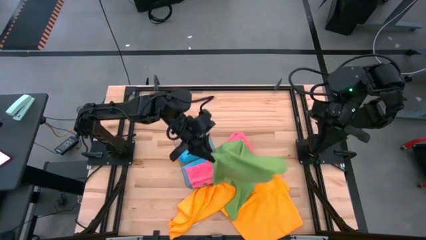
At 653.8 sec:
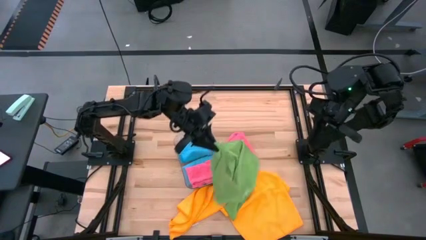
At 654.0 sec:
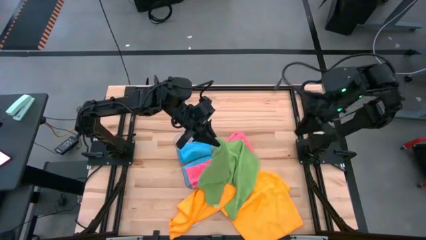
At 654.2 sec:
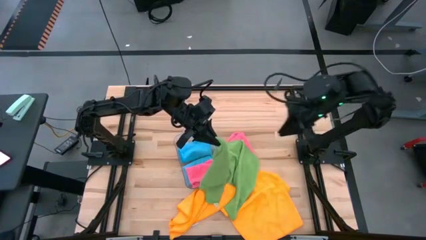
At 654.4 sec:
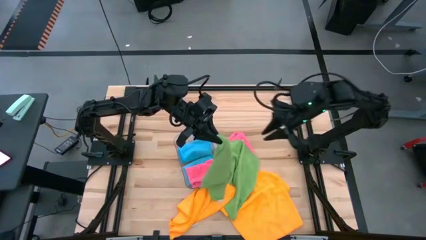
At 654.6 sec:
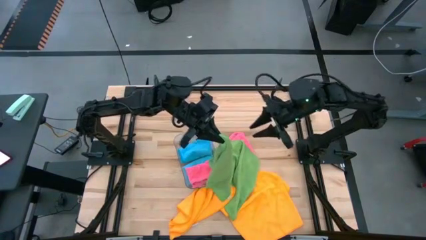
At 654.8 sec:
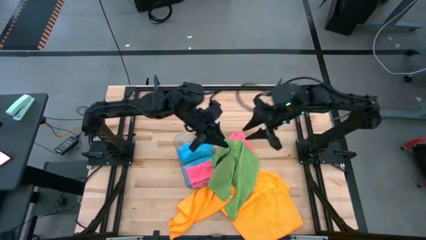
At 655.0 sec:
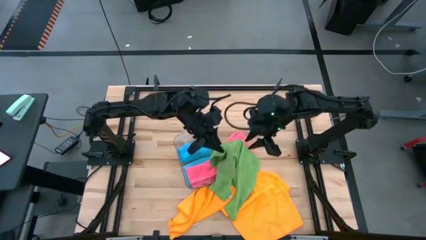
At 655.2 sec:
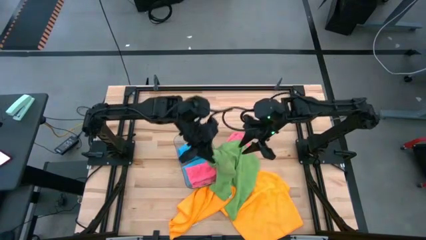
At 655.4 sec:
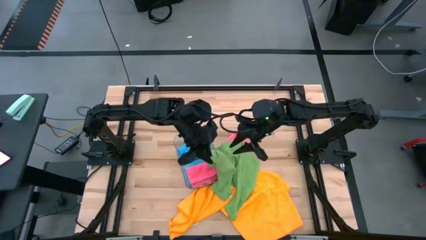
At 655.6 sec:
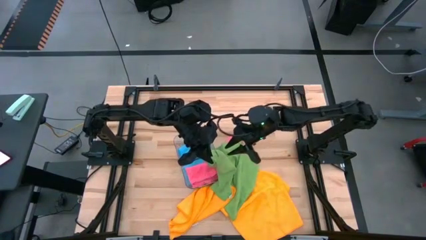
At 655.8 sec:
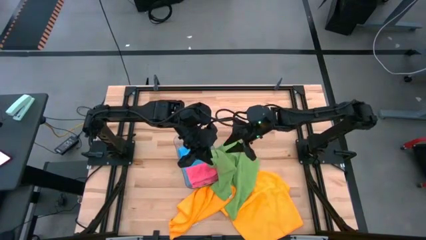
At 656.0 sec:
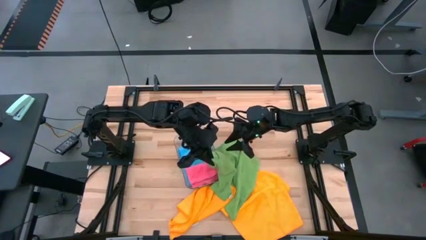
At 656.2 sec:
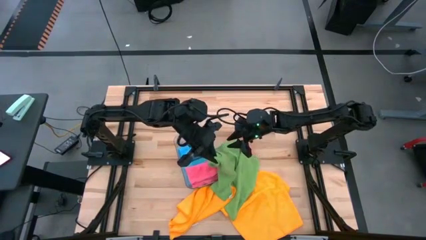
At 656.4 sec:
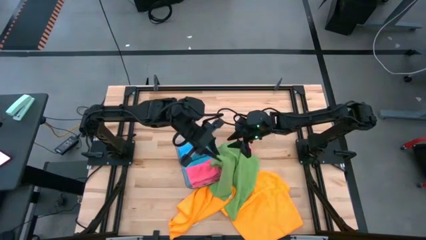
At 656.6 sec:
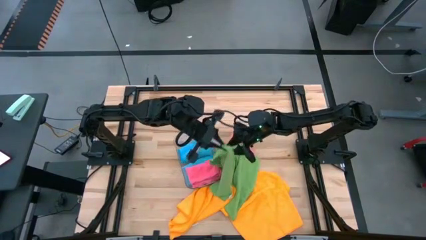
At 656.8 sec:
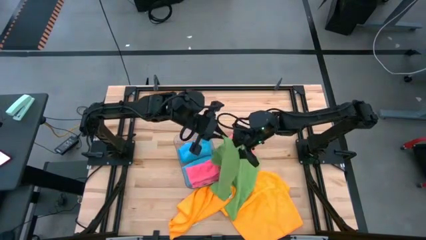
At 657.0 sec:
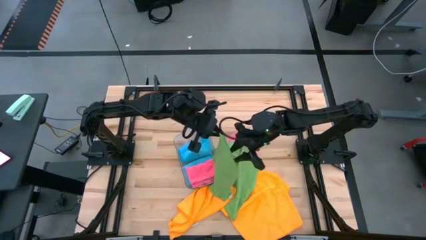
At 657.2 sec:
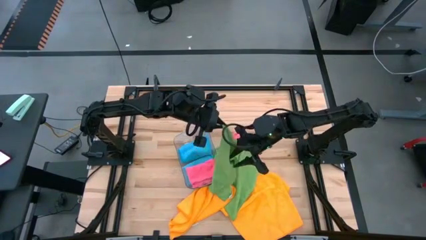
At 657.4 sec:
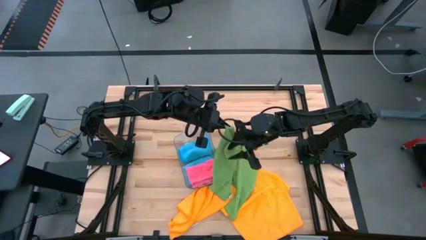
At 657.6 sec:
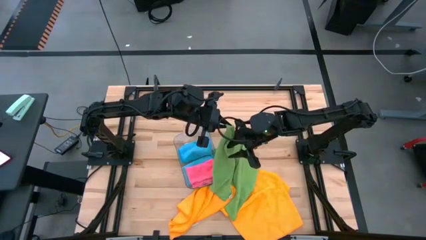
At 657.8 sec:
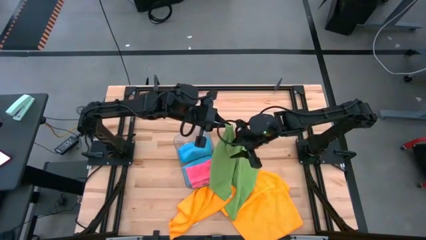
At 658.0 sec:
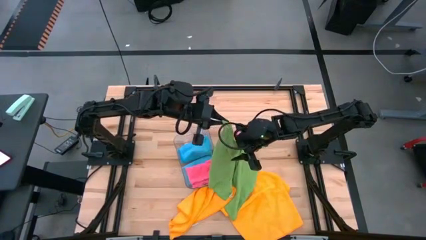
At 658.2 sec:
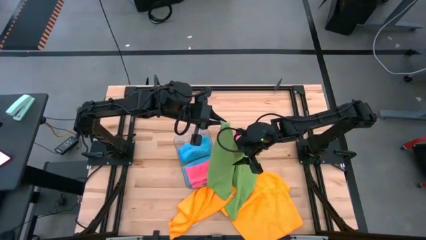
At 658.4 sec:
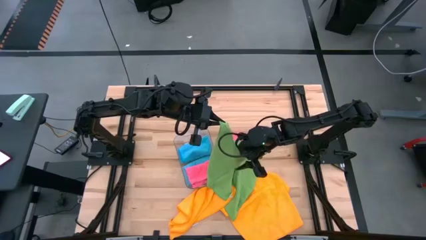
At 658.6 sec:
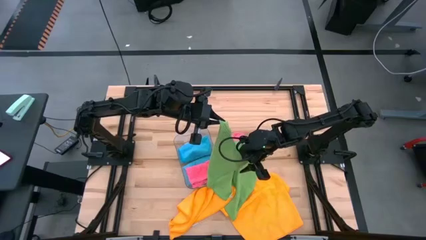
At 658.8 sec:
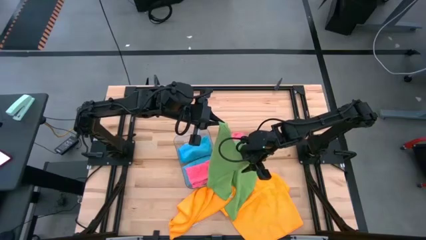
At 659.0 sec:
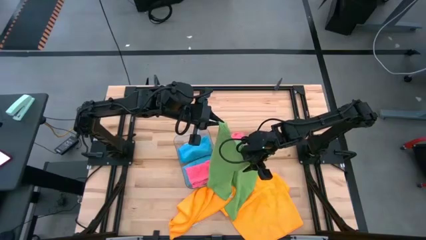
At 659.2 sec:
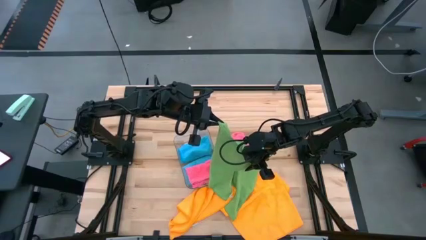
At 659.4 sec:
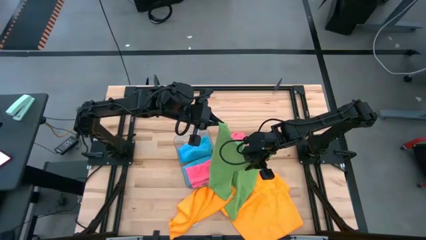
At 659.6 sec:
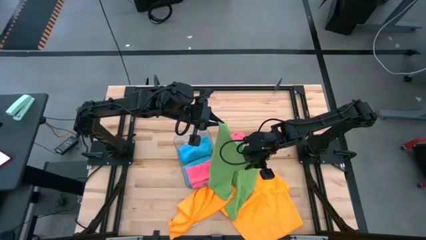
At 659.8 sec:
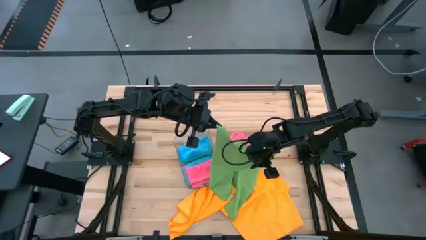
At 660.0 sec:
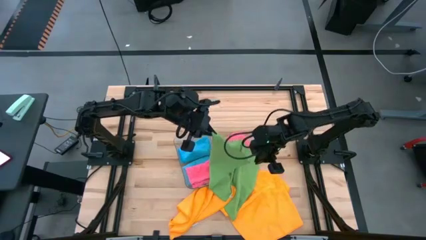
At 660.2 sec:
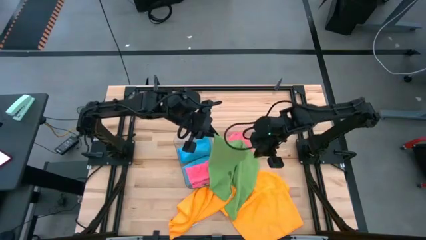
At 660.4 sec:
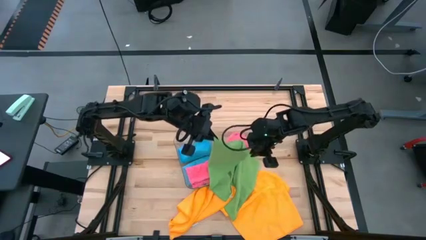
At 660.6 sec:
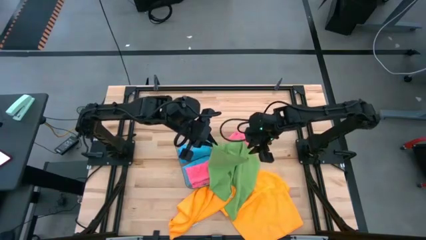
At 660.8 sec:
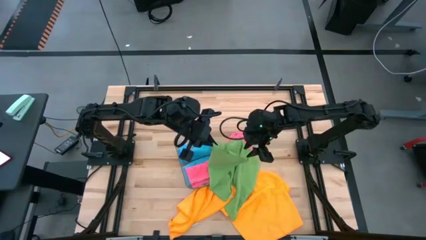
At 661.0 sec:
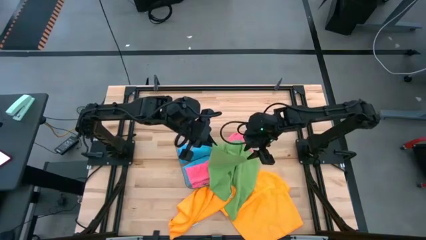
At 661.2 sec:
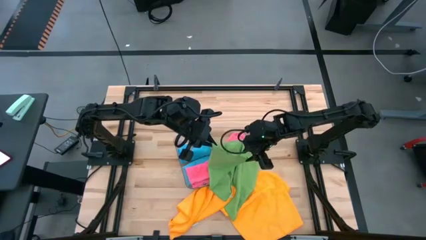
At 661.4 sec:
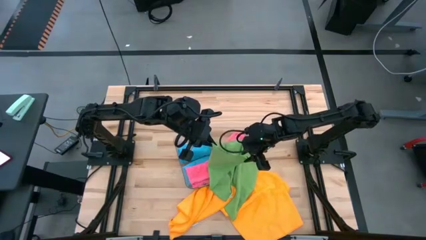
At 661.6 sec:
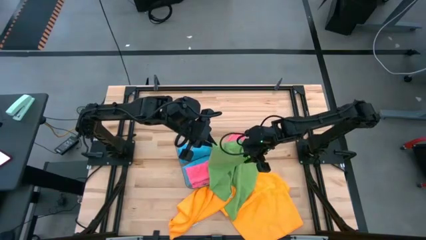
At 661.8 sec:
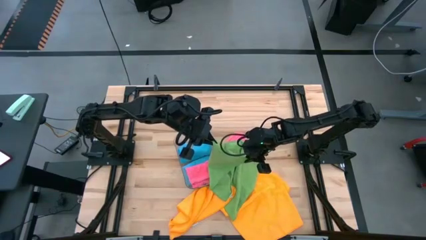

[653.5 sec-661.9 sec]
Task: Fold microfiber towels
Fold the top green towel
